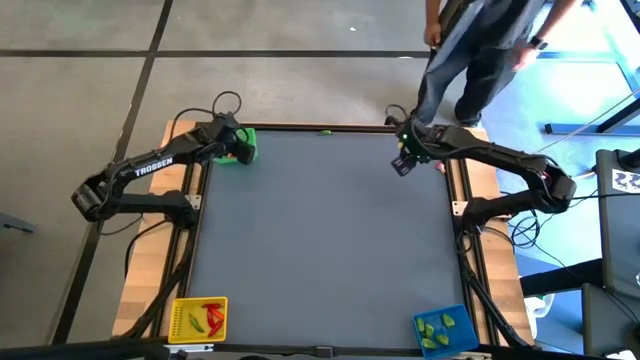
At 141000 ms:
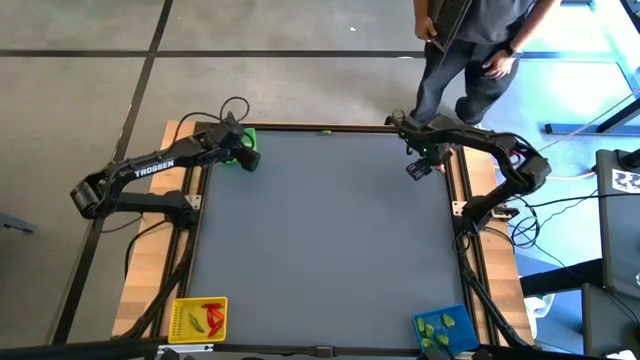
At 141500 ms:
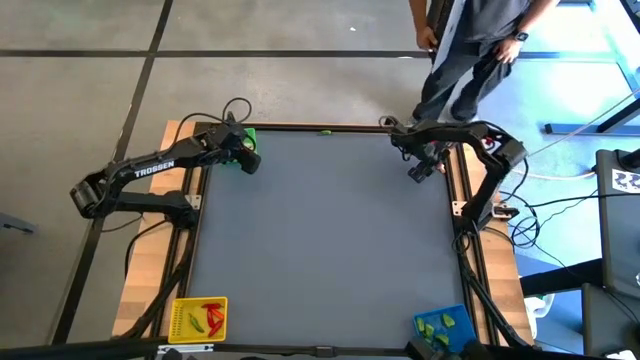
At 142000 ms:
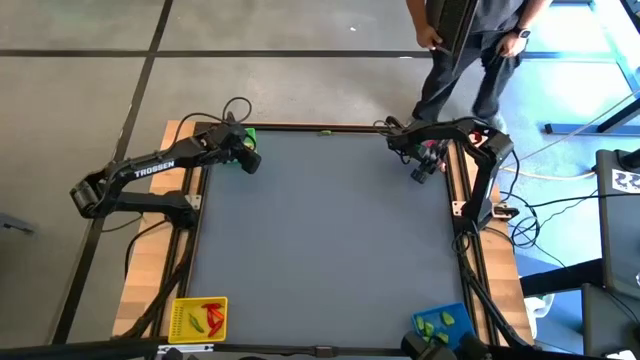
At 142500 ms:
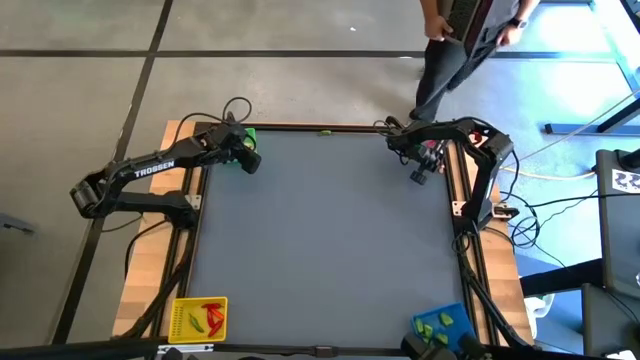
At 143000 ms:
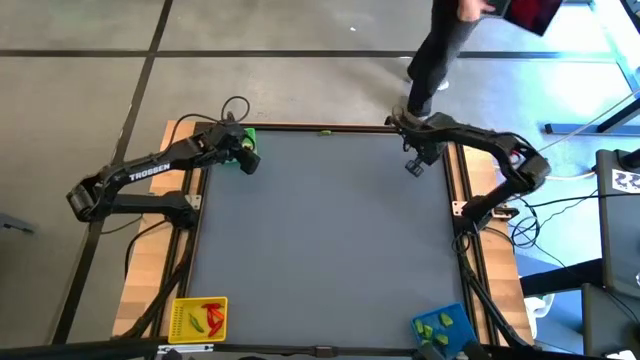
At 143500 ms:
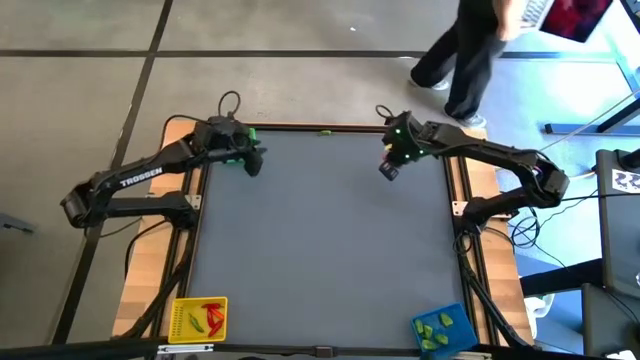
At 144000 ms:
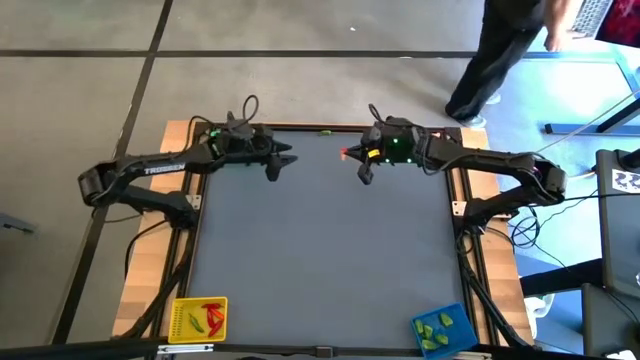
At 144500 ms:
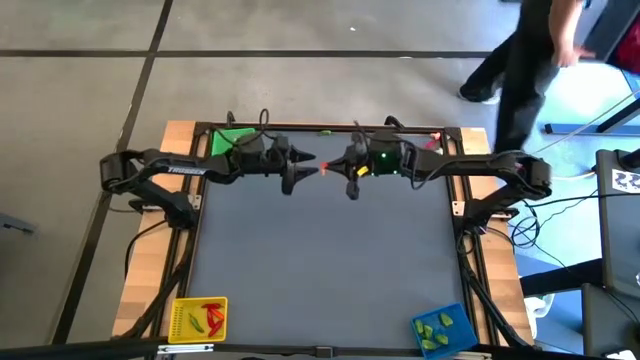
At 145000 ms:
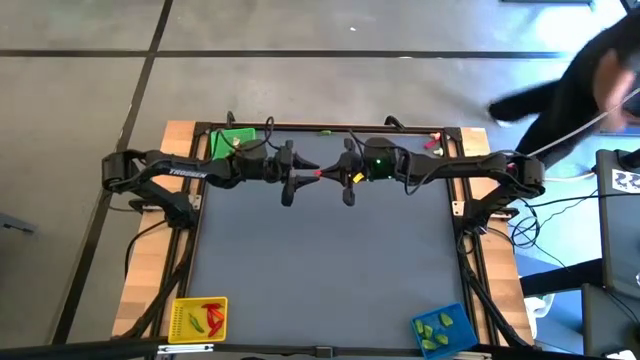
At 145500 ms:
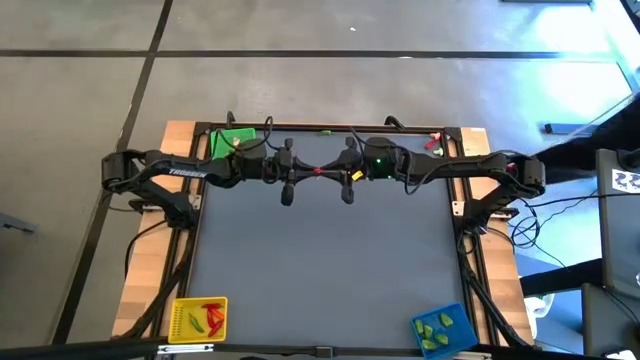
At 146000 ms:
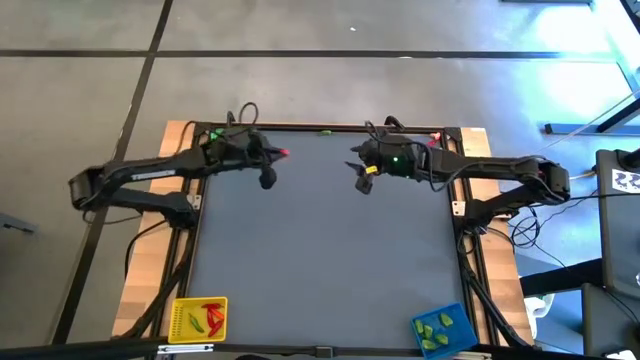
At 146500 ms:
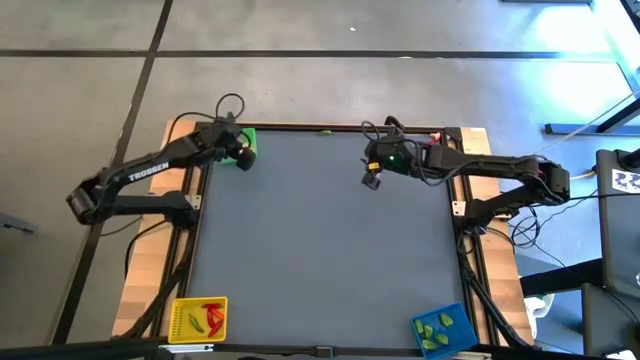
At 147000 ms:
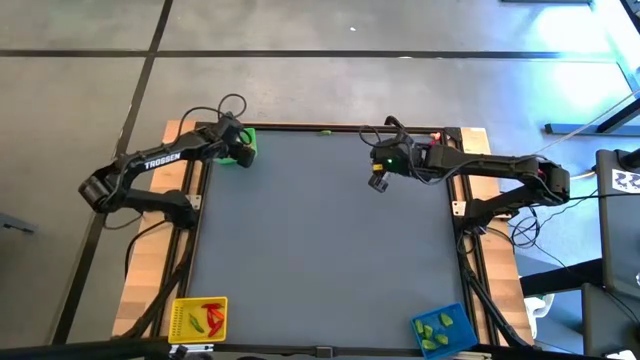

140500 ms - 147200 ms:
Task: Sort produce into baskets
Put the red mushroom into the green bin

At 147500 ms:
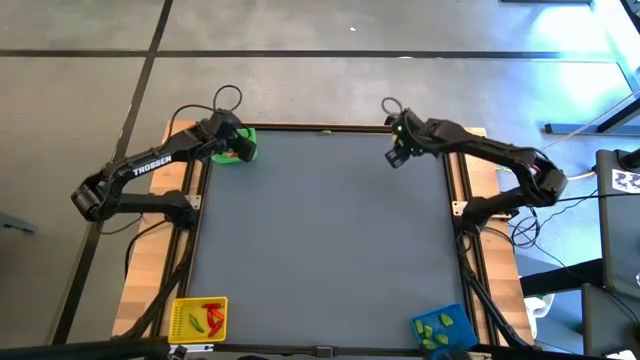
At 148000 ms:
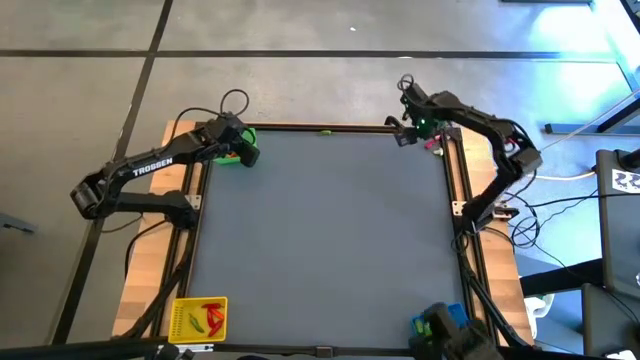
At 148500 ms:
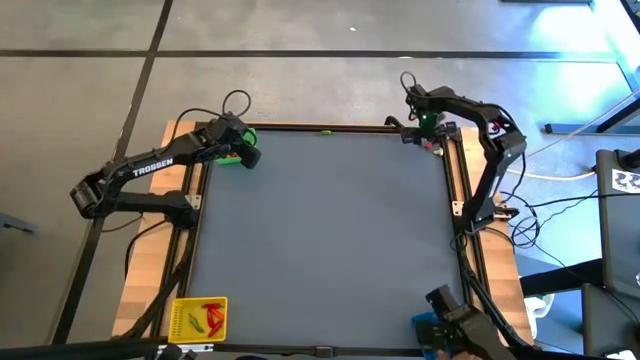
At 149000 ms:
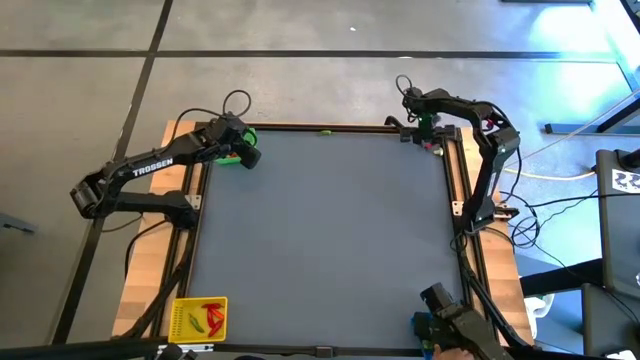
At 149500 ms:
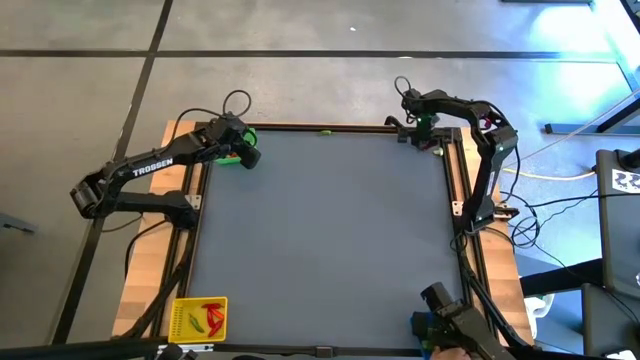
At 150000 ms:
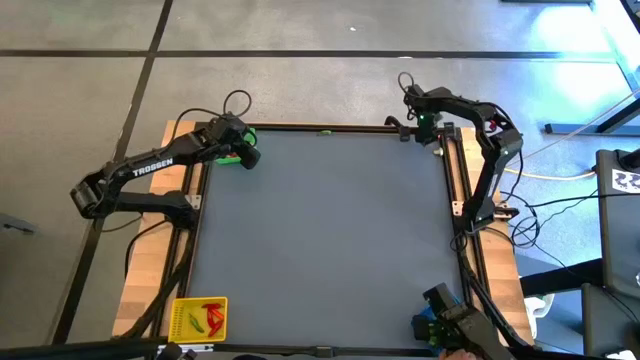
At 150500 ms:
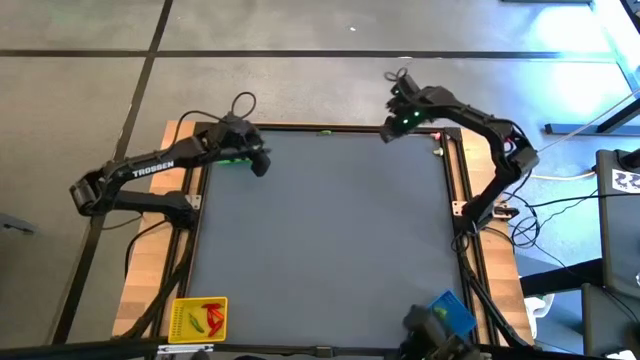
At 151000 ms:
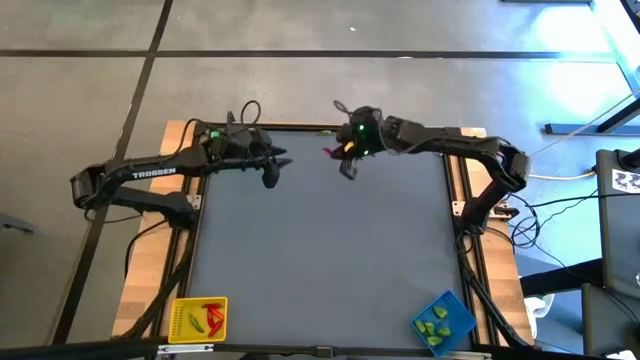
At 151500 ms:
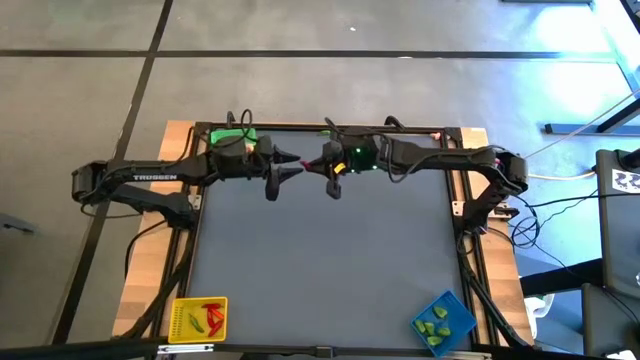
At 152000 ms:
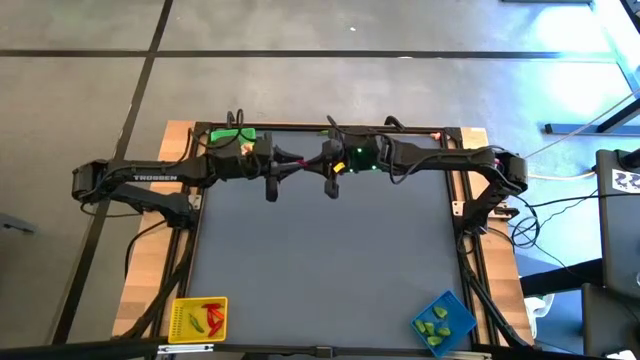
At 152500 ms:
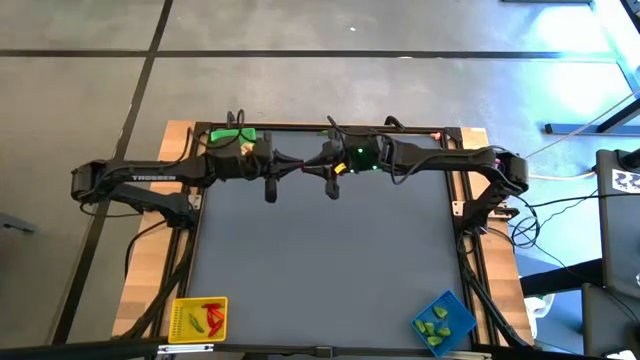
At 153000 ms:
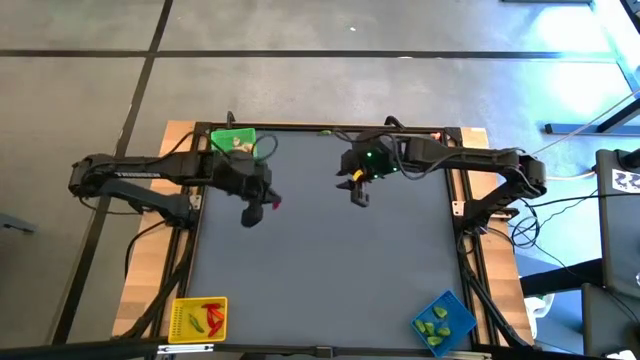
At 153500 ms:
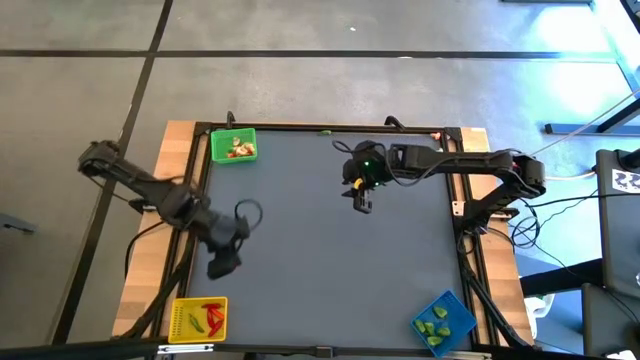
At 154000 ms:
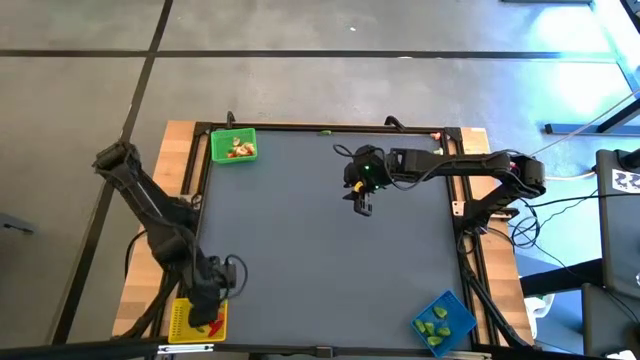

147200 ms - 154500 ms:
Put the red chili pepper into the yellow bin

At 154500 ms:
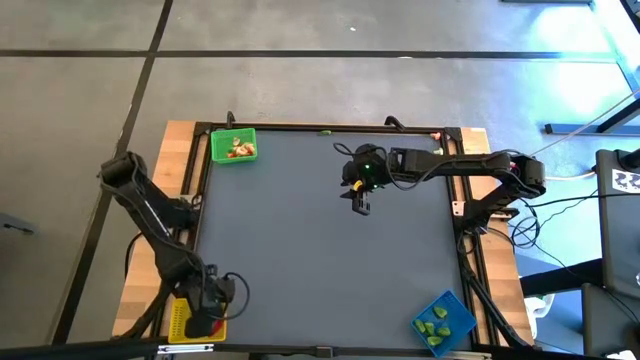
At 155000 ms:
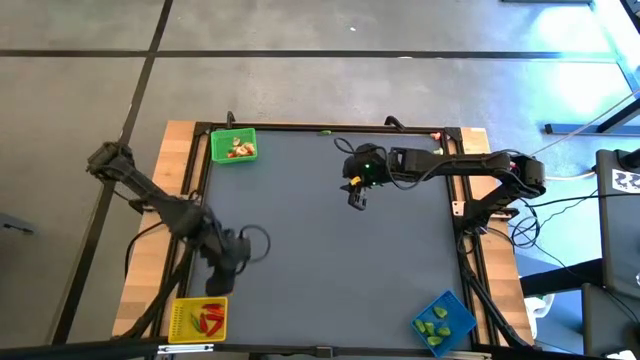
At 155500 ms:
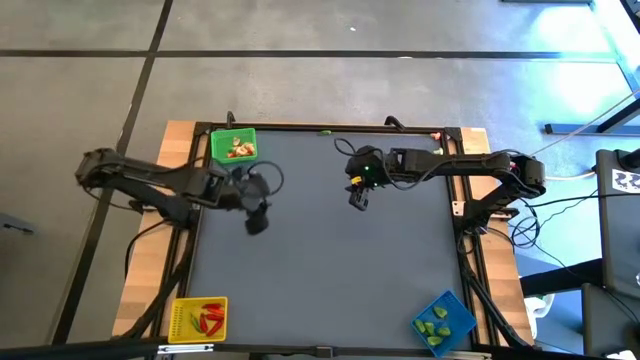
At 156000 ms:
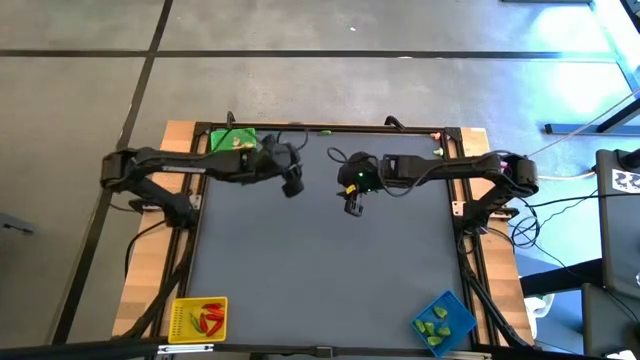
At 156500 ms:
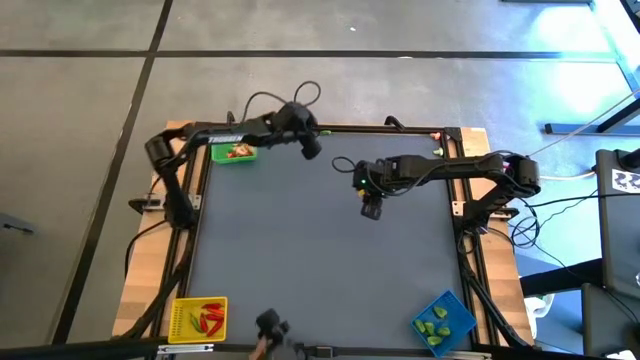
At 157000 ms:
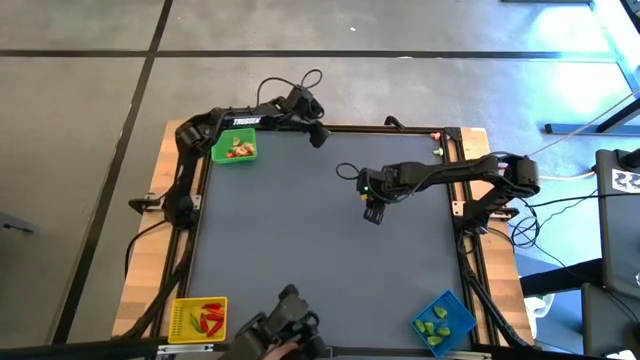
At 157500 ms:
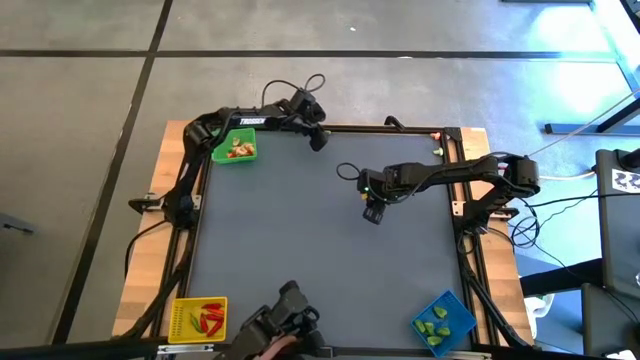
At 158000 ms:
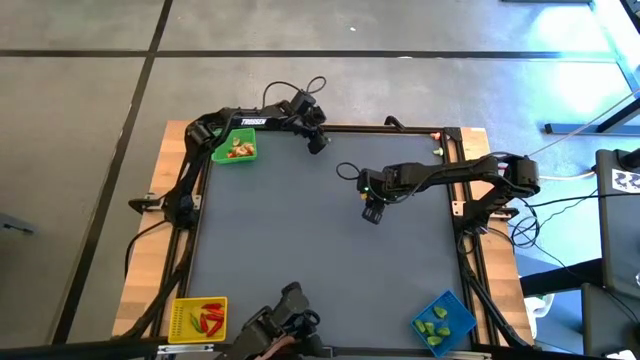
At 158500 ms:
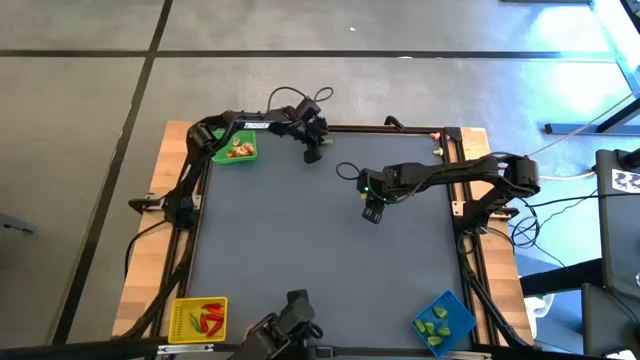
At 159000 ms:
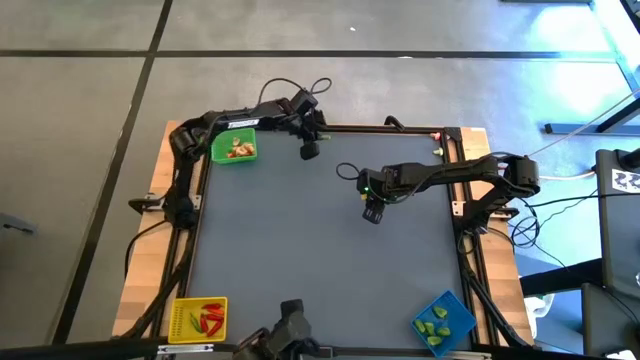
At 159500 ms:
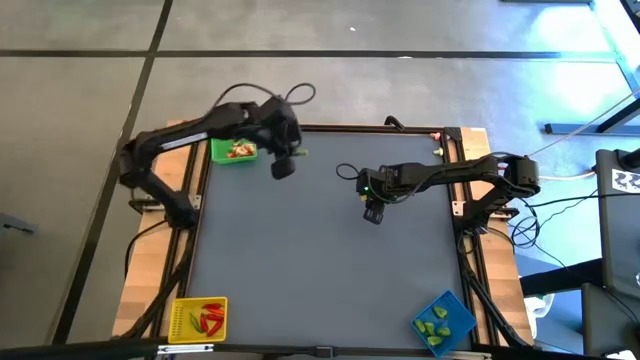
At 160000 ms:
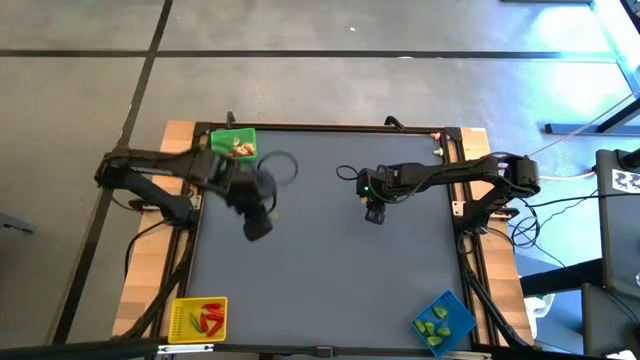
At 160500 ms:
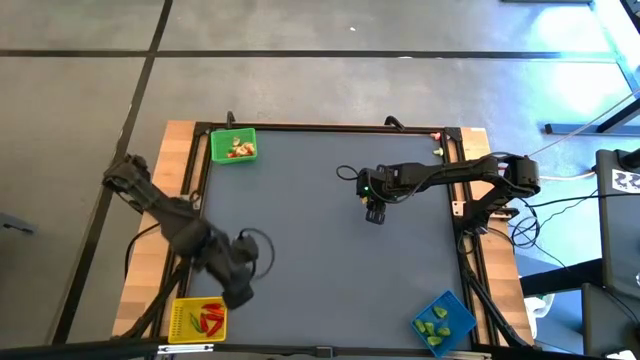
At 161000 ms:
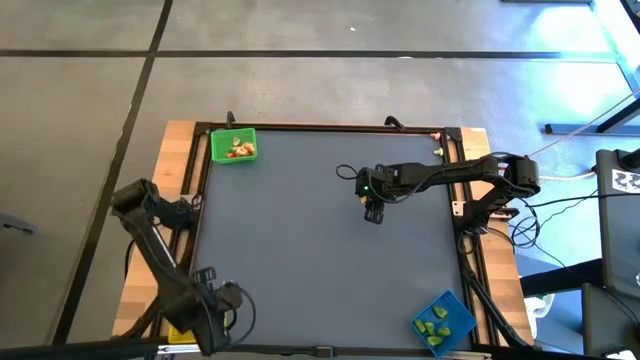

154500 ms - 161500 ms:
Put the green chili pepper into the yellow bin
